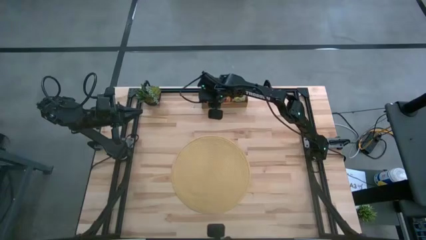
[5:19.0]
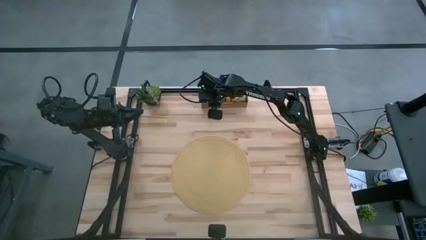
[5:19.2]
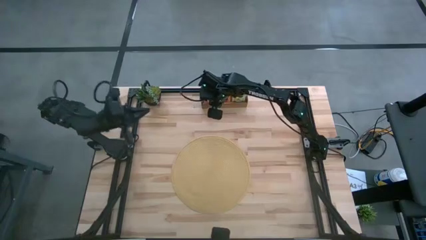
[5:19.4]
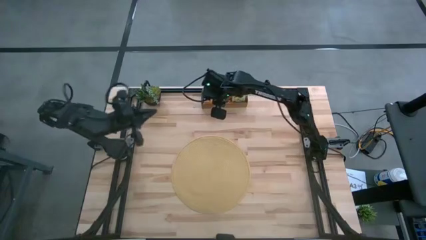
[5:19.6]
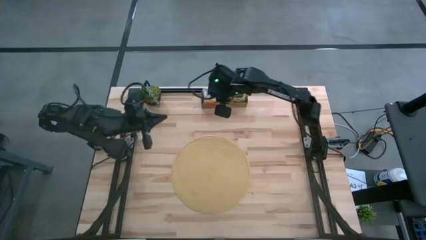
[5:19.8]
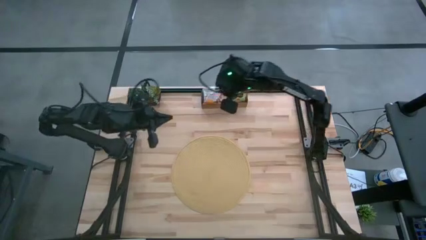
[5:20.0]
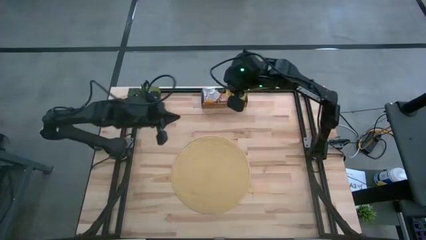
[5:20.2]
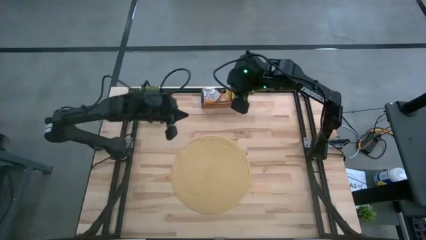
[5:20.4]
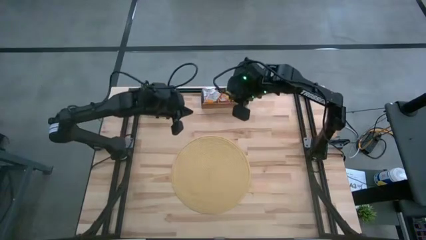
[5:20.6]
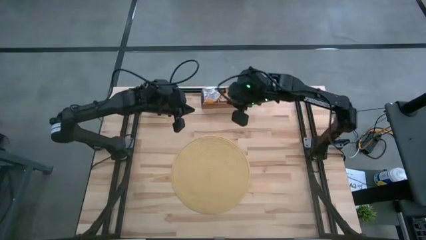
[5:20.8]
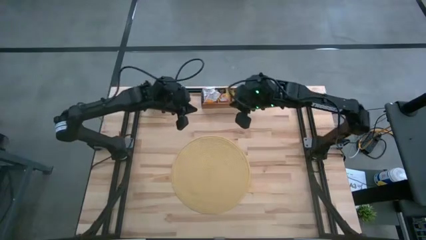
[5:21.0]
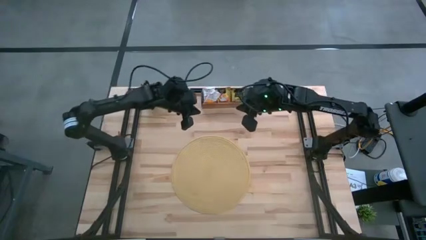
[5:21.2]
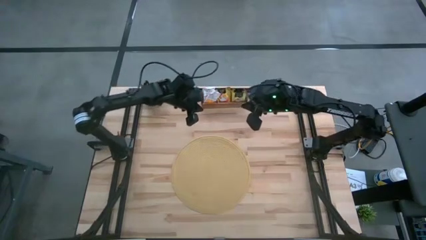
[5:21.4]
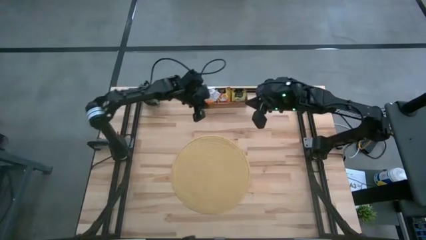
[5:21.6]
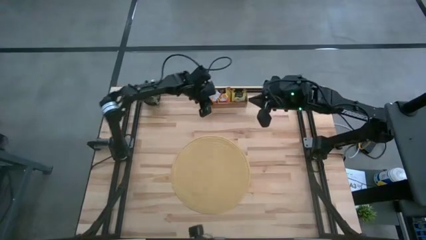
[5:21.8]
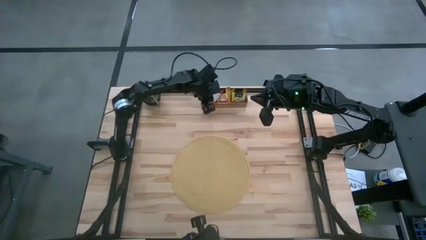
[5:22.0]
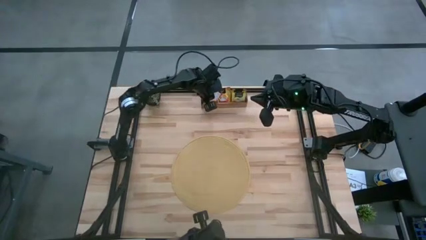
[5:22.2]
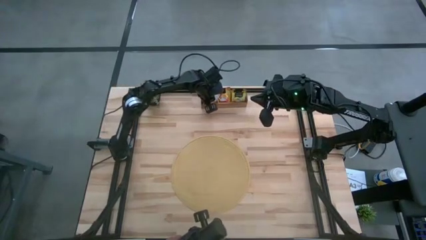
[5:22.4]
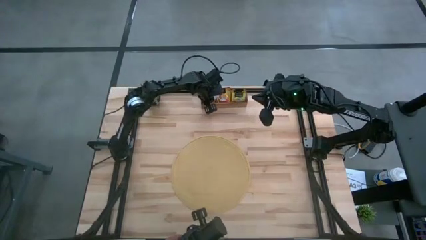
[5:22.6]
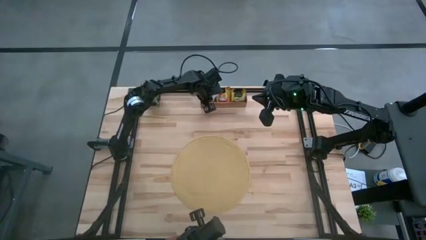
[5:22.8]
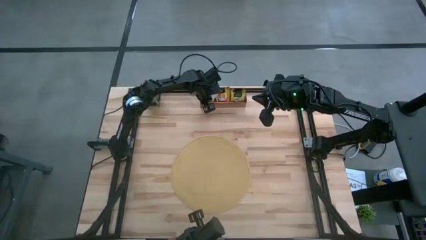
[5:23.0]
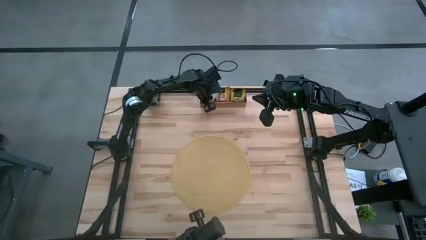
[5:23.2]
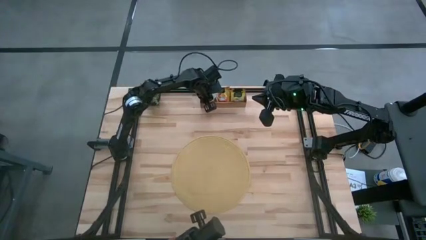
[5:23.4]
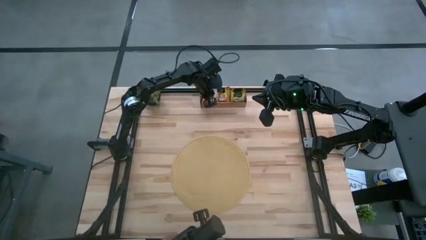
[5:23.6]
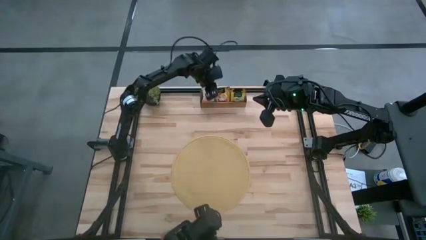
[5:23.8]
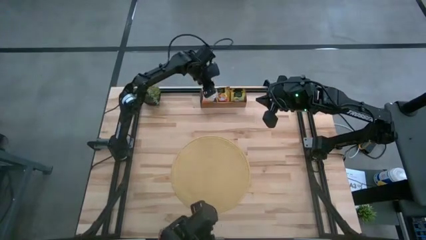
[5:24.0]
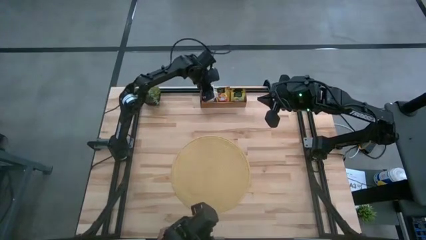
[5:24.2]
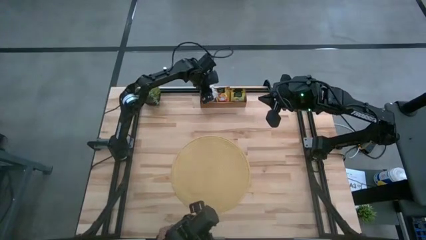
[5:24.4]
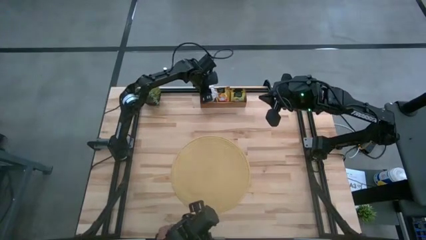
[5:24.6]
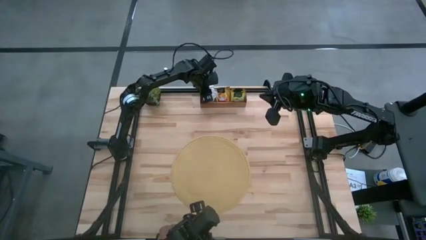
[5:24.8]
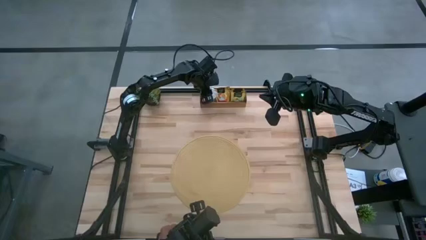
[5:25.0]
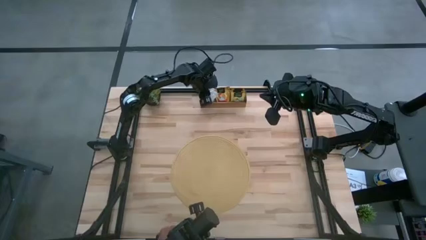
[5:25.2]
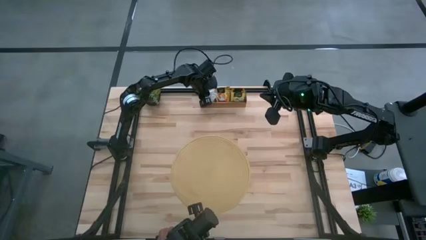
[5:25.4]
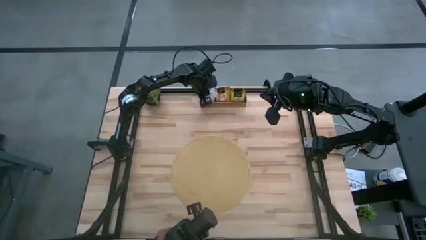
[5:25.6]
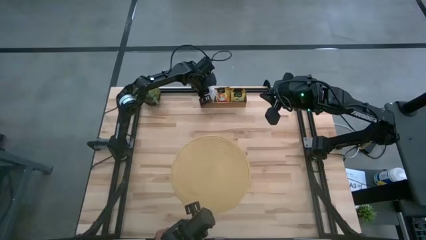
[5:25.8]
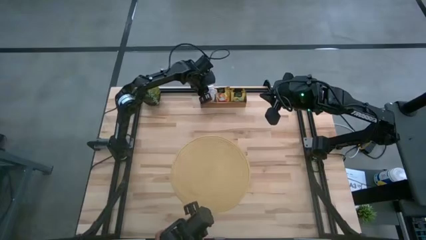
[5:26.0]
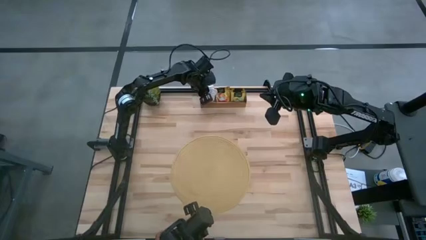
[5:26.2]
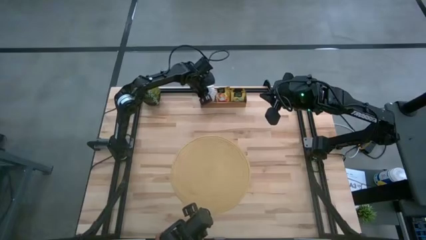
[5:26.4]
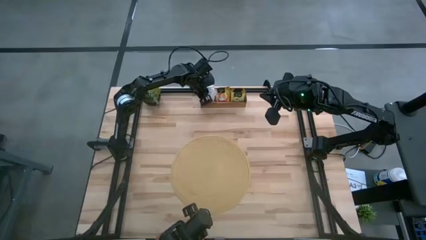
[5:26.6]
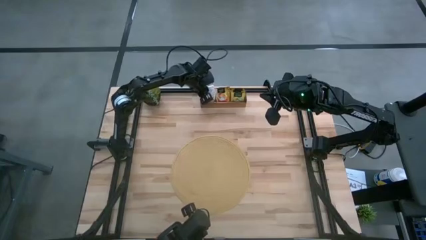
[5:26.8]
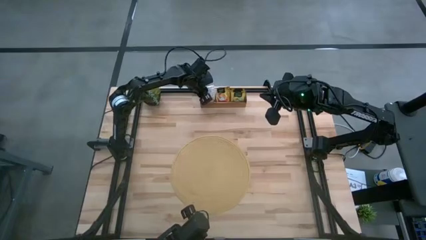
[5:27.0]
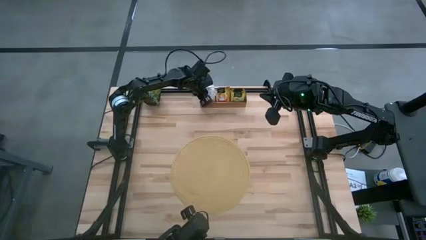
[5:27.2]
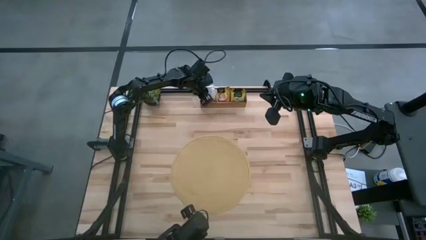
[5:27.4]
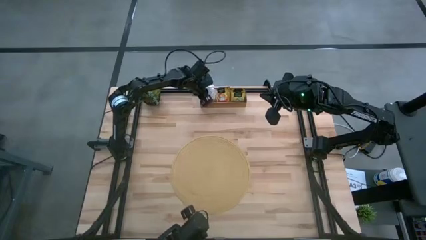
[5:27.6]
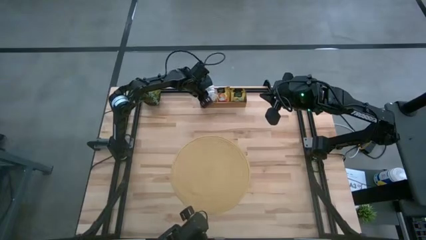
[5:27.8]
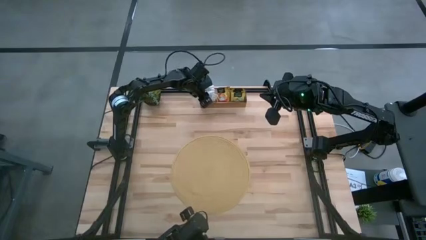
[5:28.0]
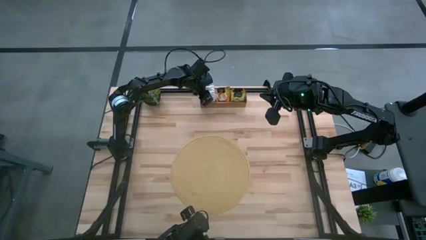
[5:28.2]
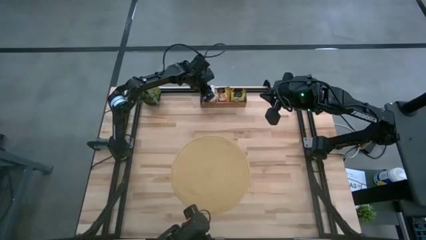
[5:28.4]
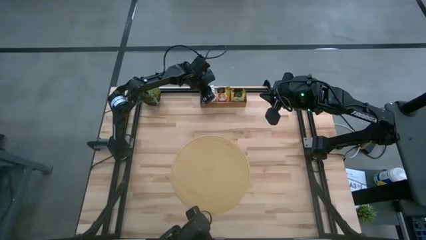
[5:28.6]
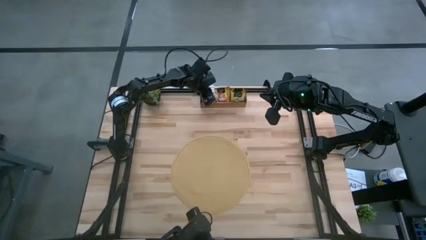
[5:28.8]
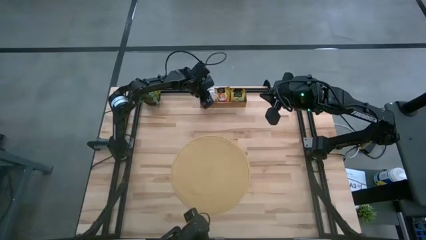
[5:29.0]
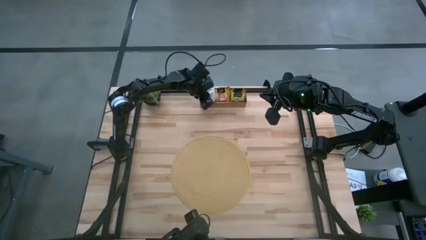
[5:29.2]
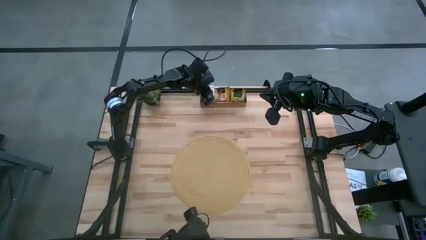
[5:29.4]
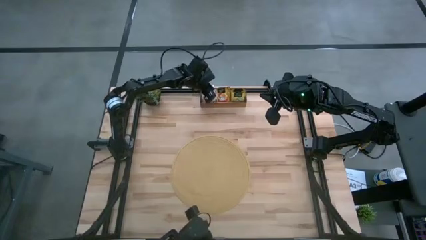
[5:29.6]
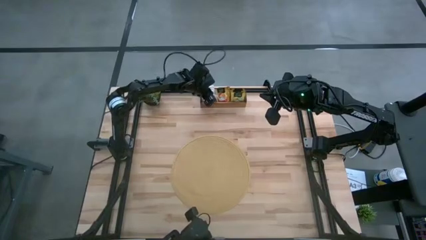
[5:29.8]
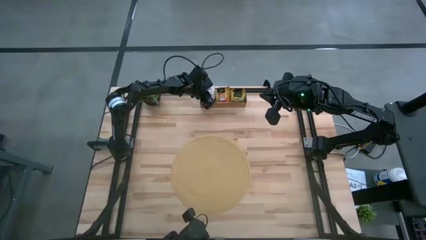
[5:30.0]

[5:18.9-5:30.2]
Task: Pick & Place Tea
Put the orange tea bag into the left section of the wooden organizer

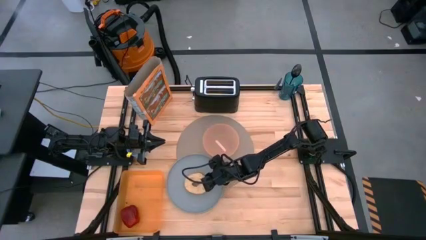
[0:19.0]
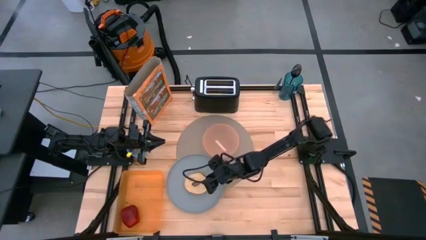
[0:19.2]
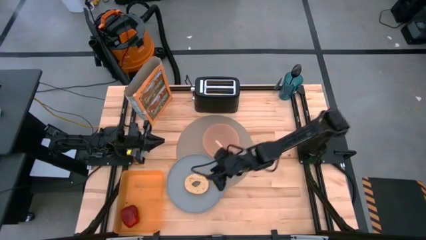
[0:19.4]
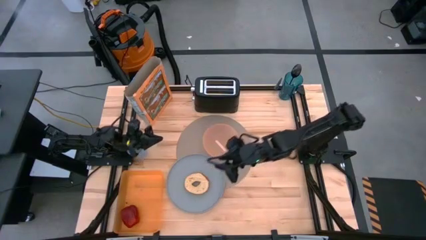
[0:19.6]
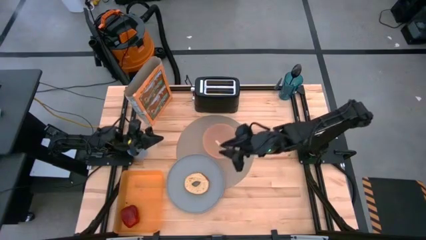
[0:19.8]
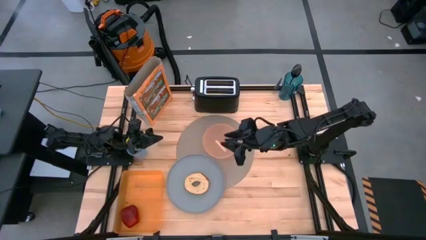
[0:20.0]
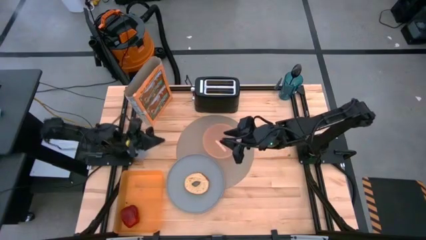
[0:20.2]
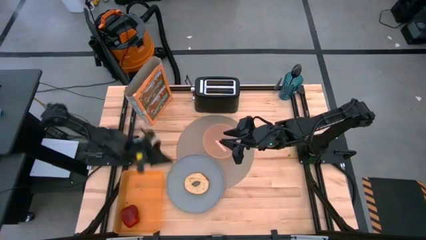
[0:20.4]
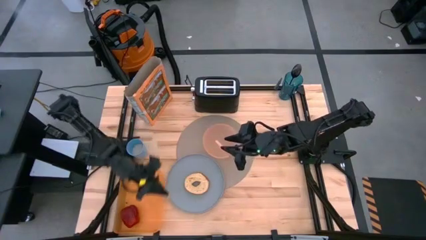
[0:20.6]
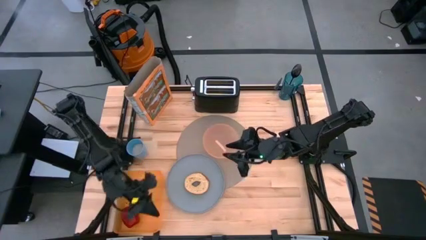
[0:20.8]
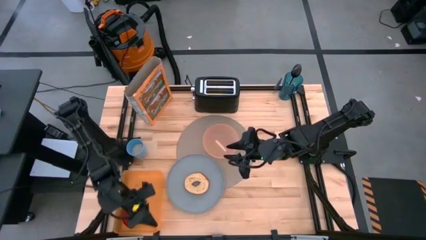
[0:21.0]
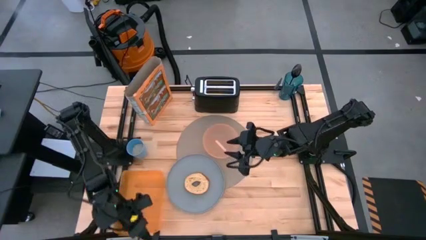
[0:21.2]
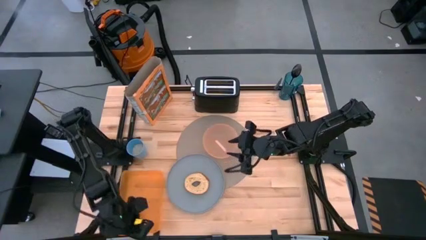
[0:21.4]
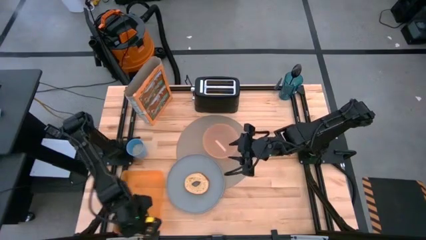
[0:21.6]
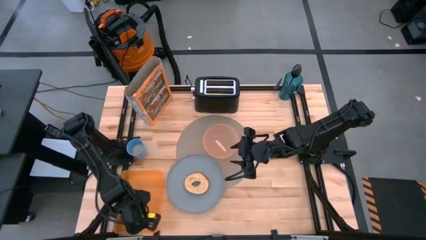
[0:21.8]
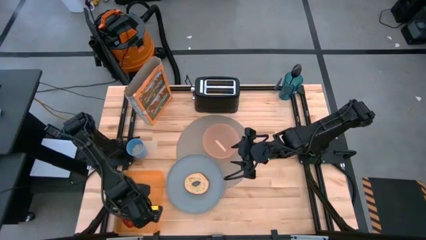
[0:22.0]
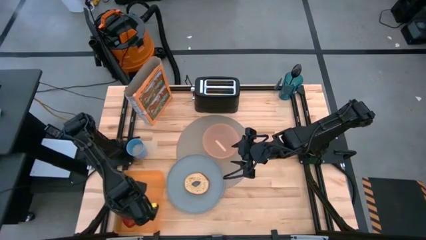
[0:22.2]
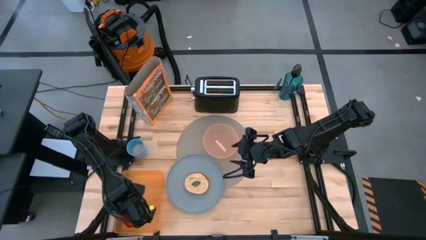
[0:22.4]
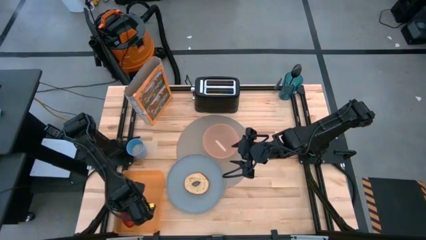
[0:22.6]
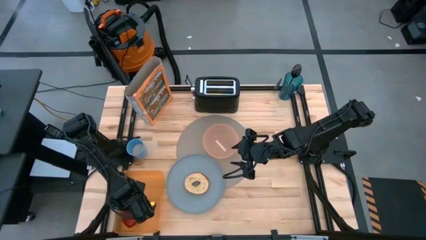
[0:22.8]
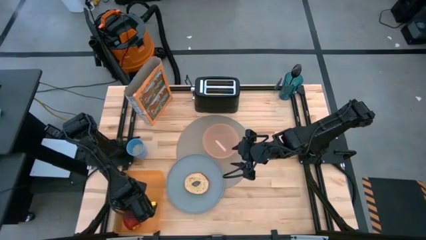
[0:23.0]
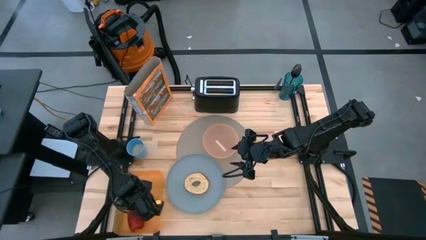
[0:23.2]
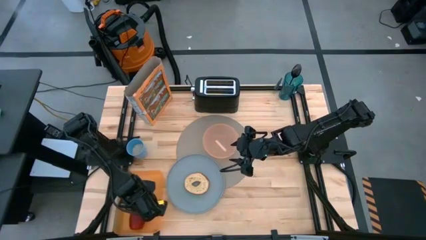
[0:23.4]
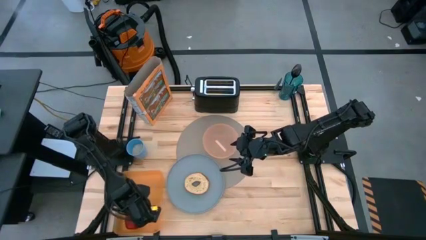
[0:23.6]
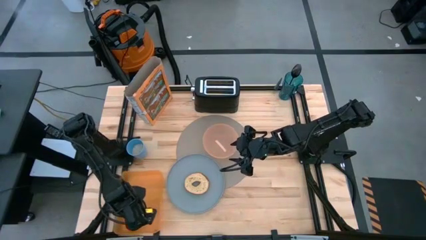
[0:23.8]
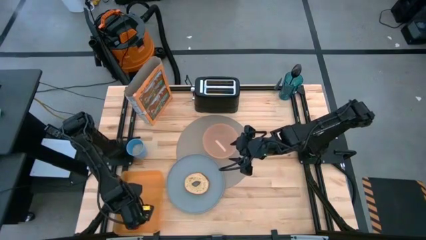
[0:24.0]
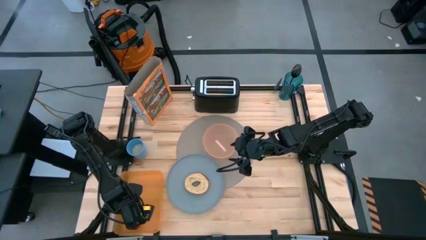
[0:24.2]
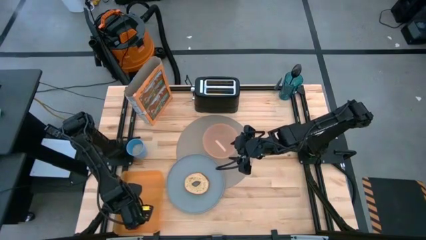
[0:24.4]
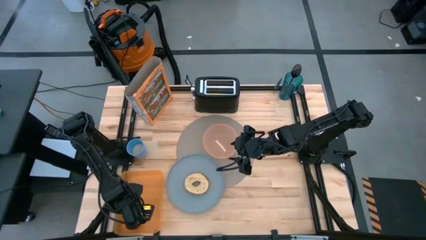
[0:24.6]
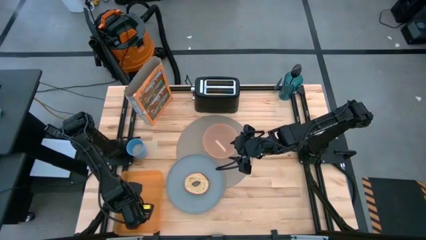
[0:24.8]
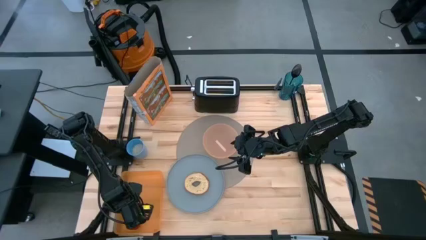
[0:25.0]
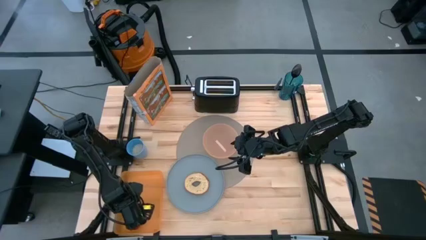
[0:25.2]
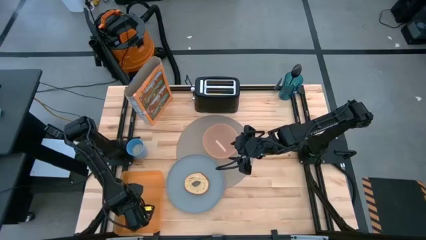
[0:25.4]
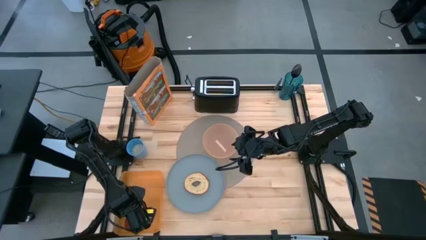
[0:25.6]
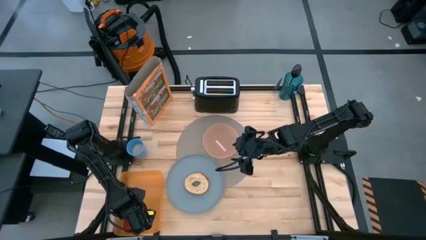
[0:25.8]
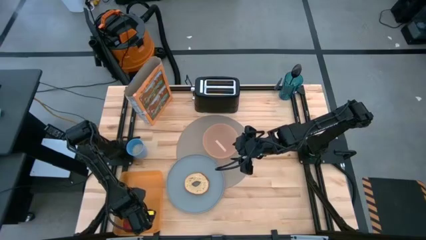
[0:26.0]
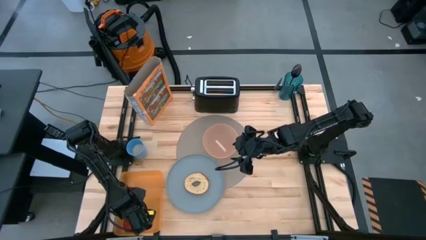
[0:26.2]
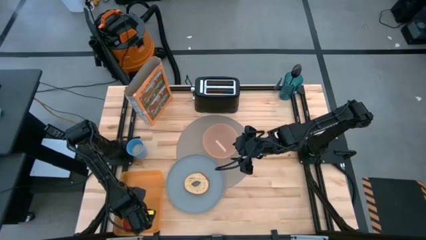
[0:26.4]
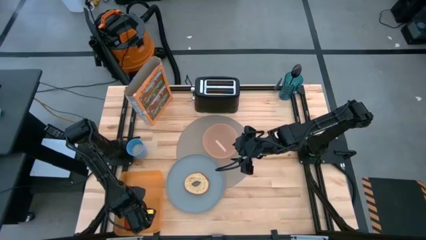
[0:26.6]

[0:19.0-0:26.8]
Task: Arrange a breakfast setting
Put the red apple on the gray tablemat
